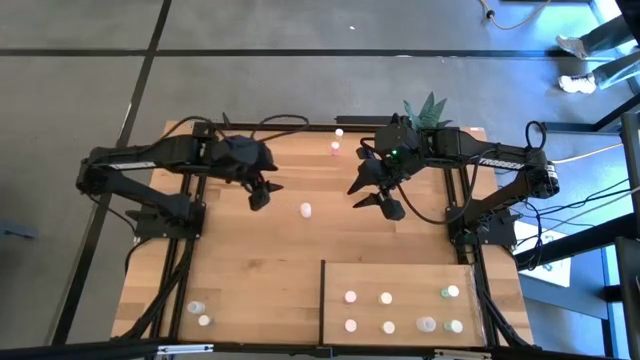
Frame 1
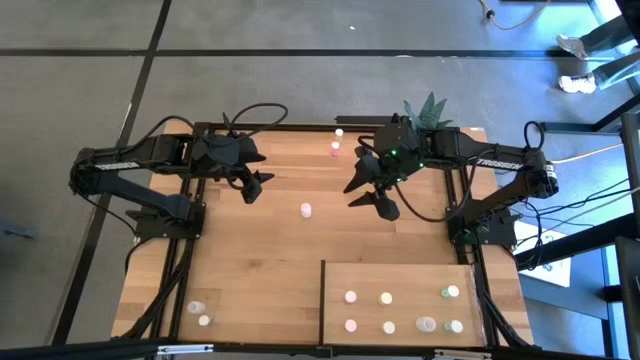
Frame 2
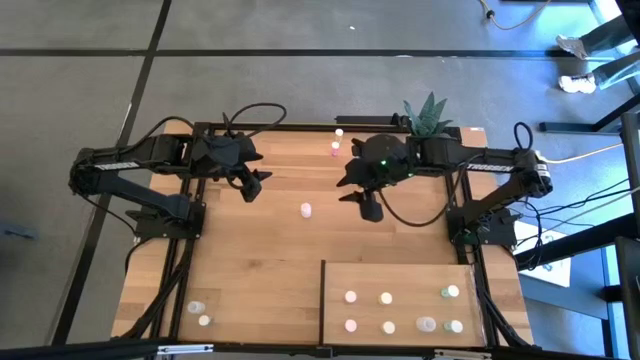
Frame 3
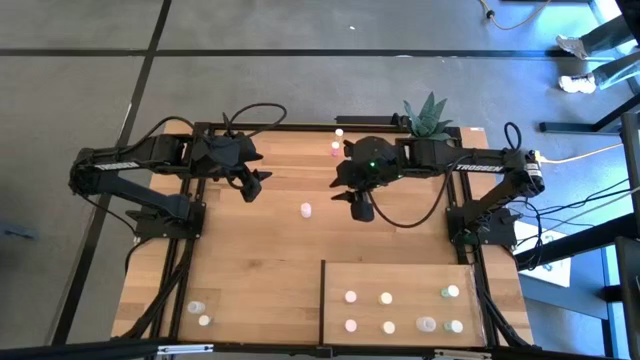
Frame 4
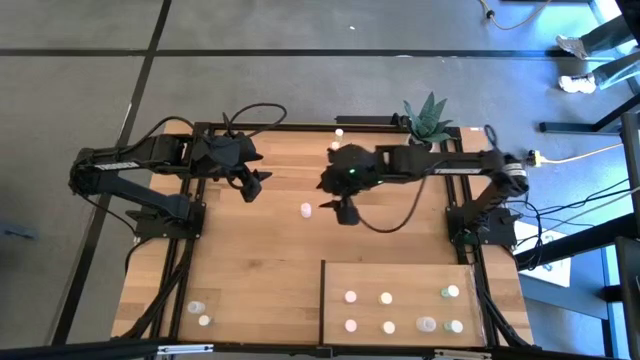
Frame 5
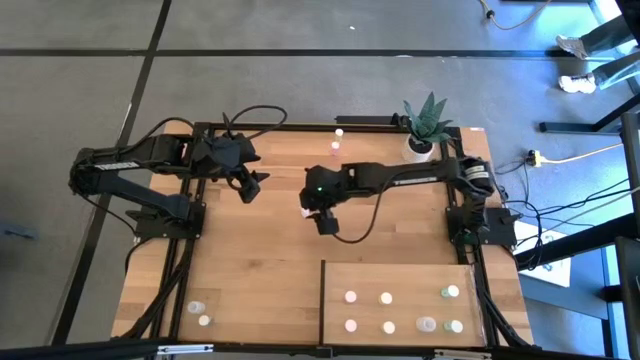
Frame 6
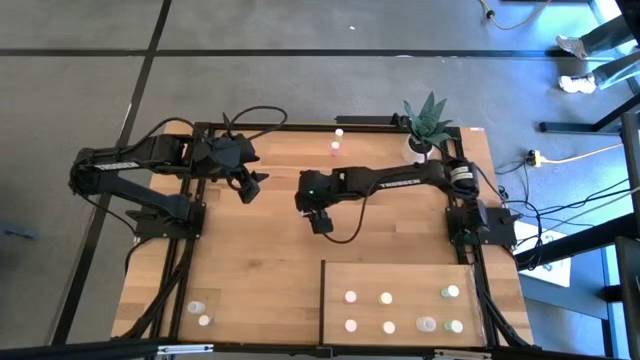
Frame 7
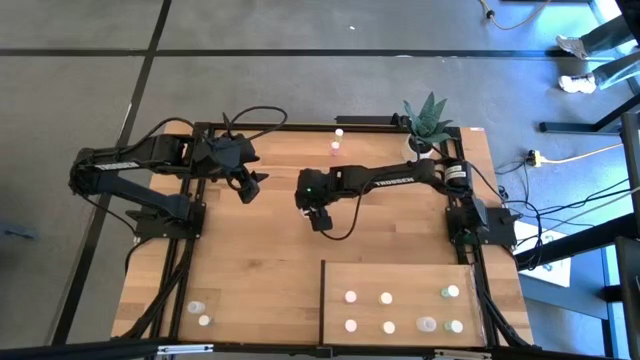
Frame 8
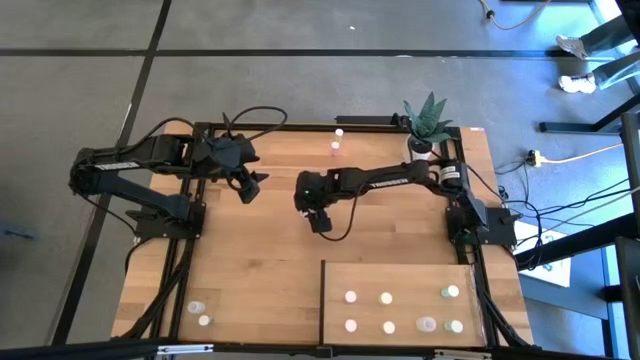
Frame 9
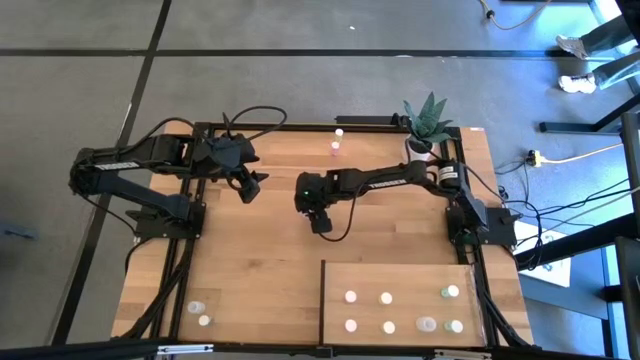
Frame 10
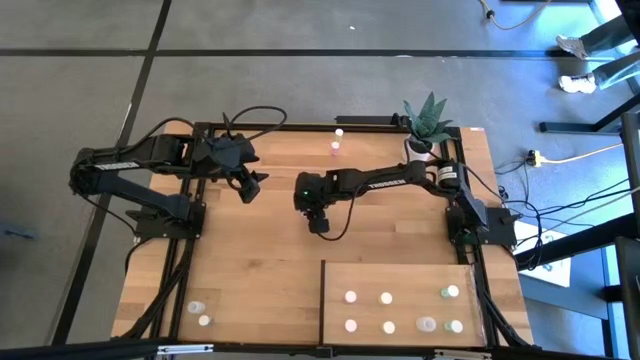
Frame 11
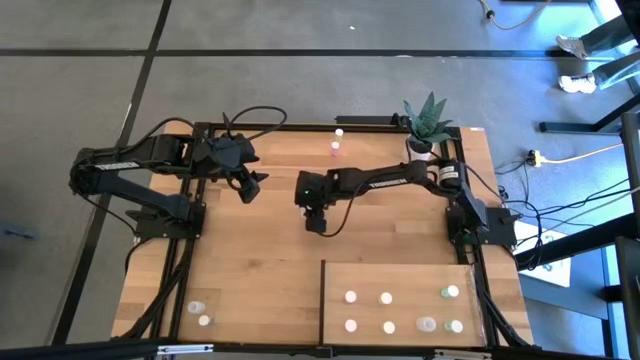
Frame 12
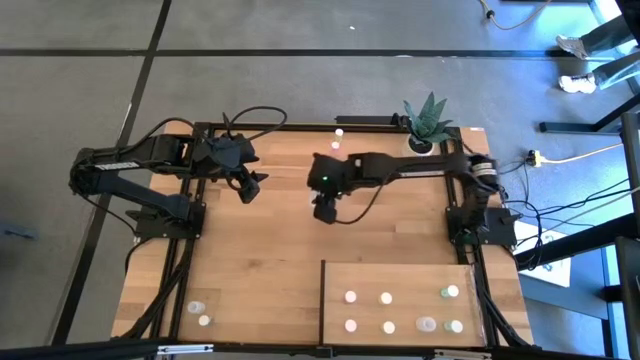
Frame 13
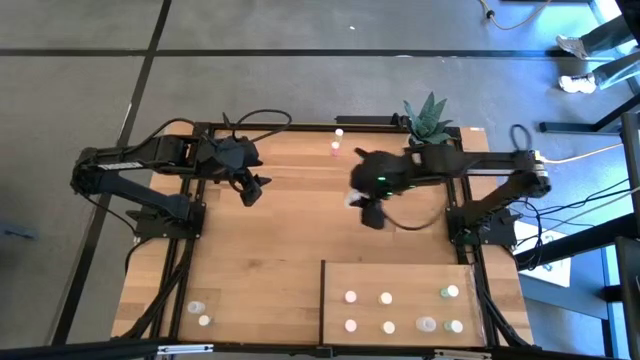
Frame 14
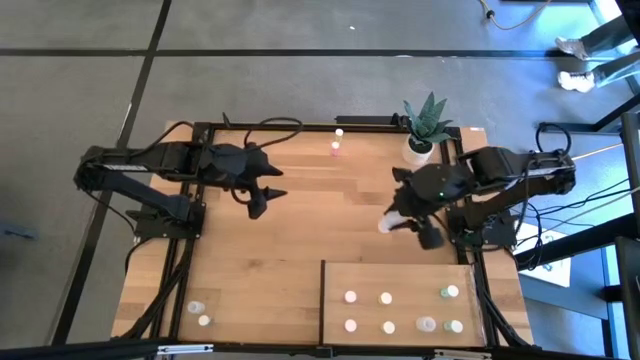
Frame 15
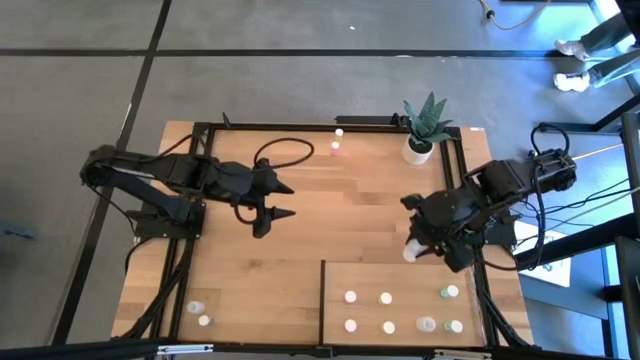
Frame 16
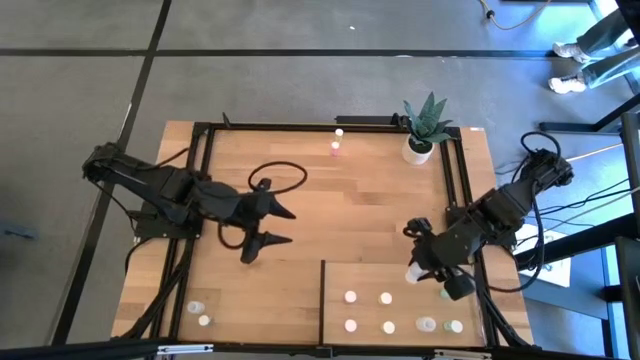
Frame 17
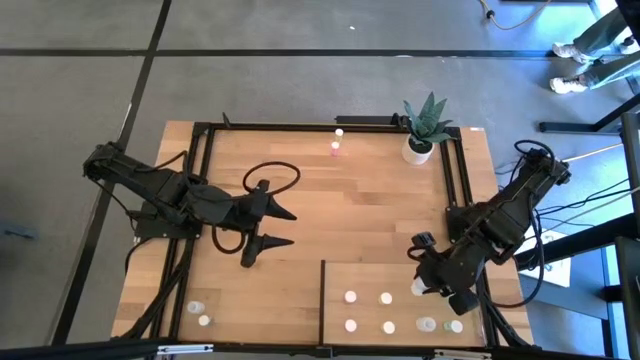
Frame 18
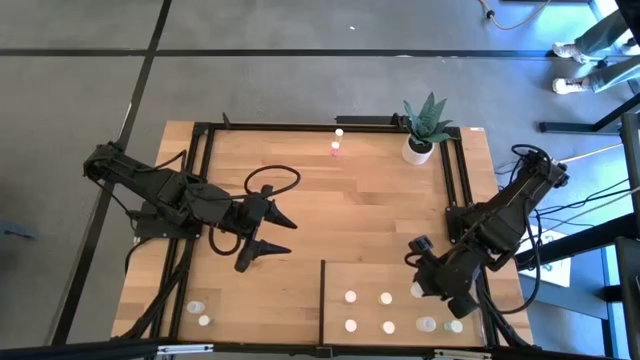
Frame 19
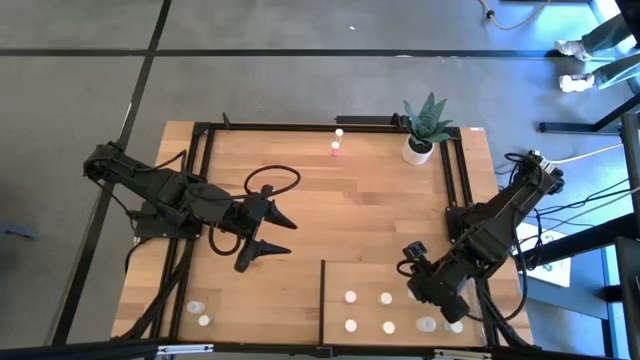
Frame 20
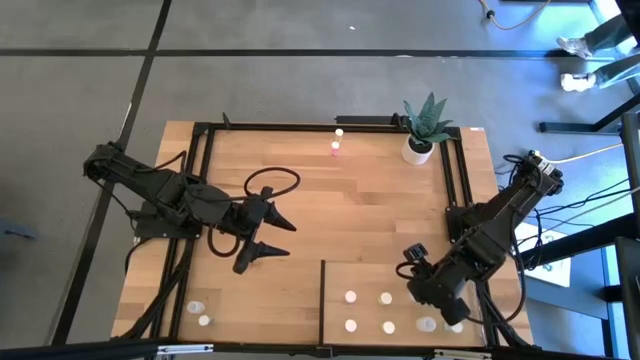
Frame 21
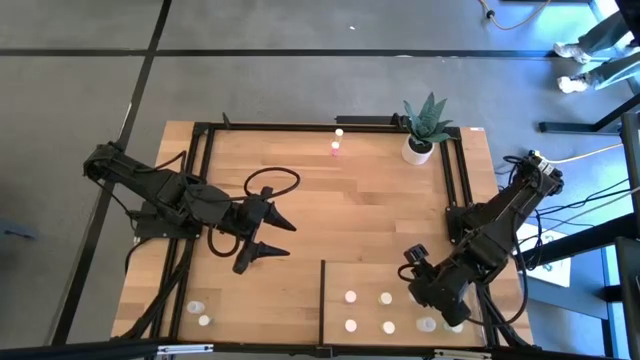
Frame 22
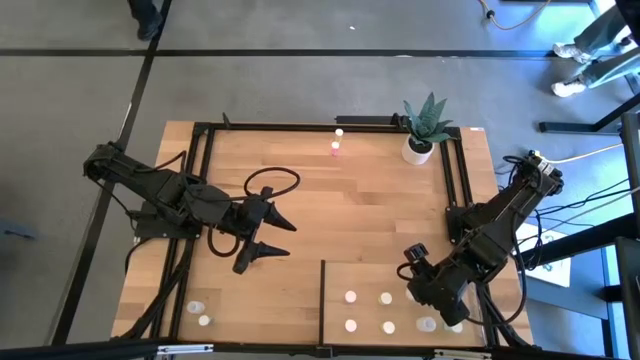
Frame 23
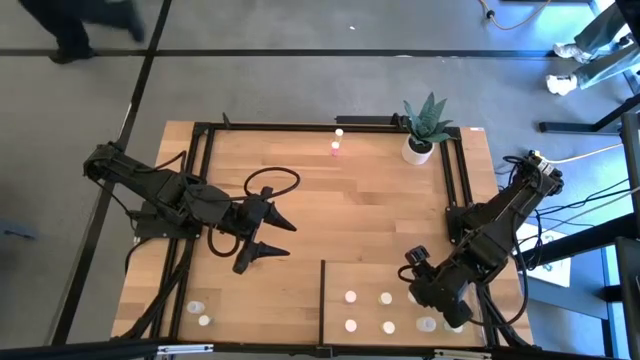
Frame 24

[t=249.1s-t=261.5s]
Task: Pick and place medicine bottles onto shelf by color
Put the top transparent pill bottle on the shelf aligned with the other transparent pill bottle

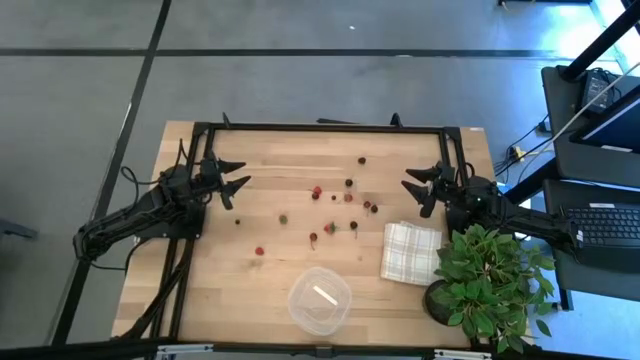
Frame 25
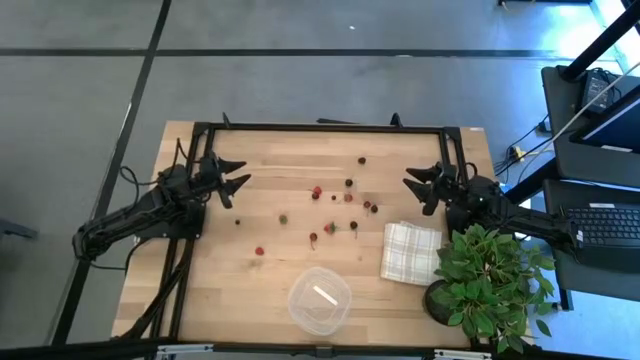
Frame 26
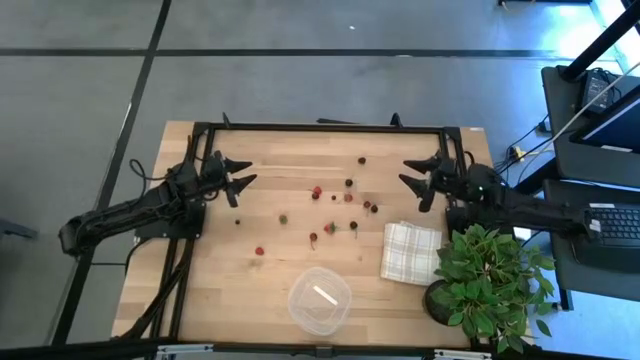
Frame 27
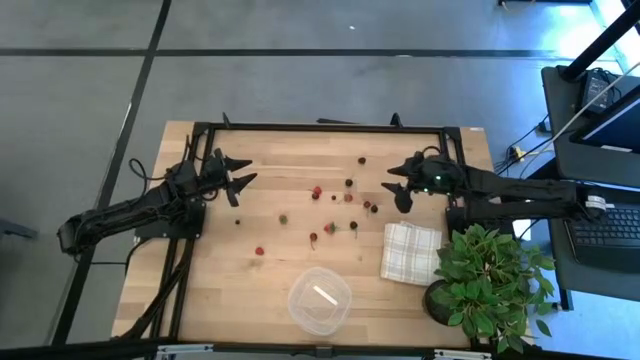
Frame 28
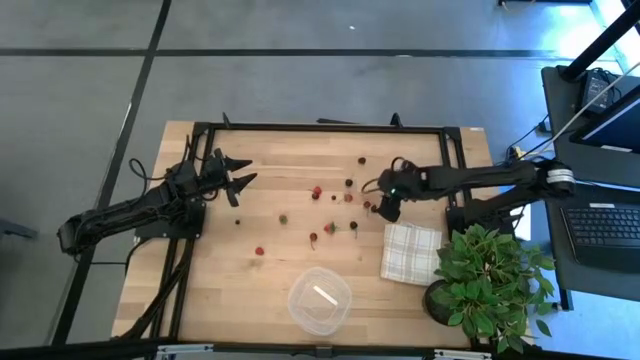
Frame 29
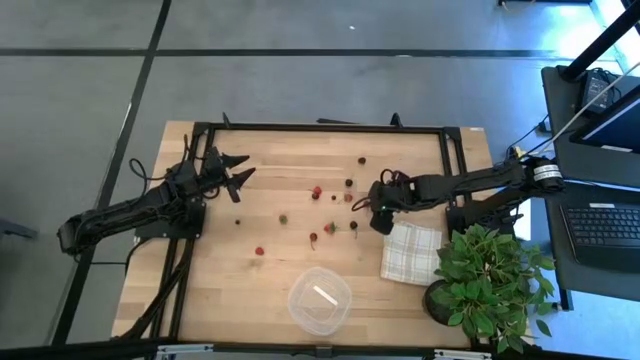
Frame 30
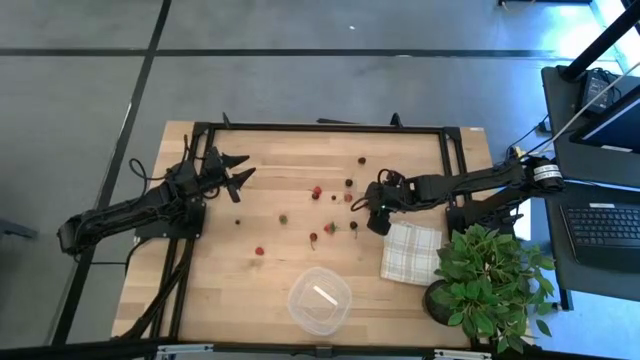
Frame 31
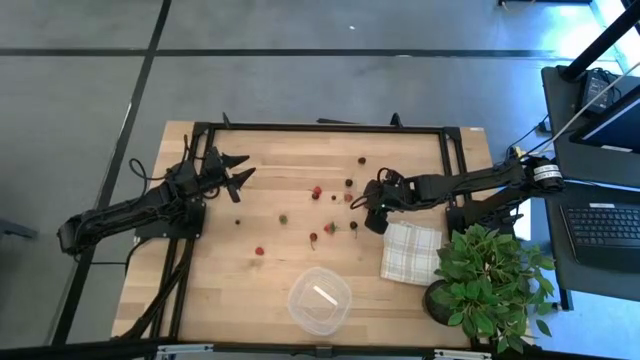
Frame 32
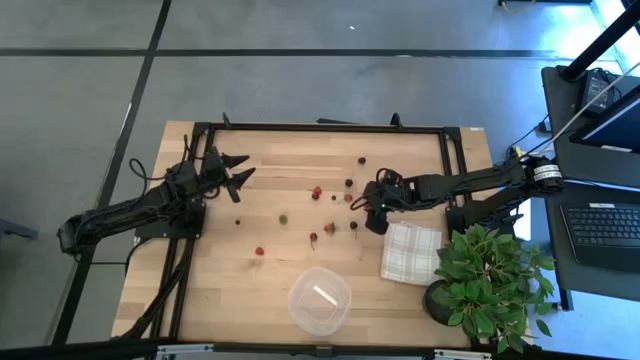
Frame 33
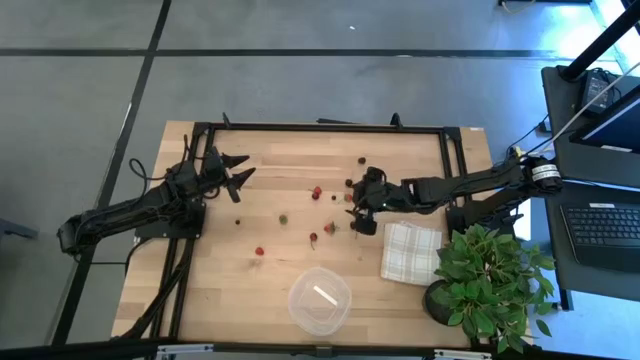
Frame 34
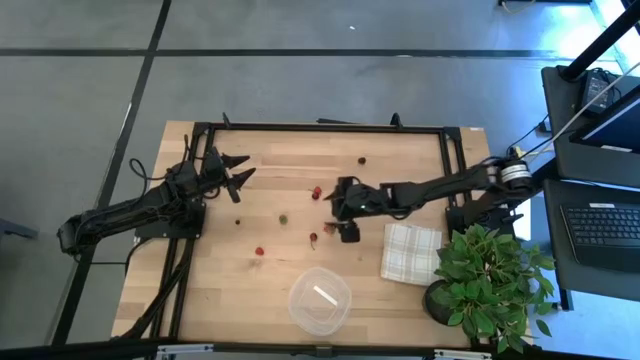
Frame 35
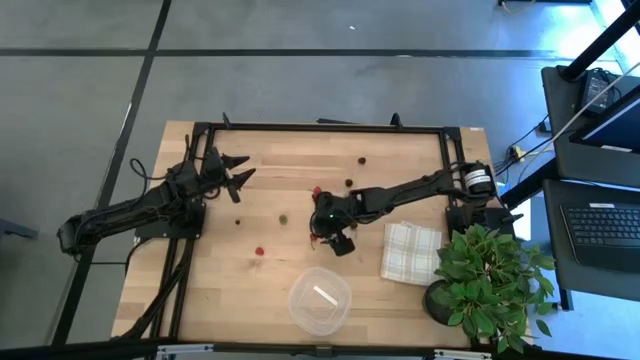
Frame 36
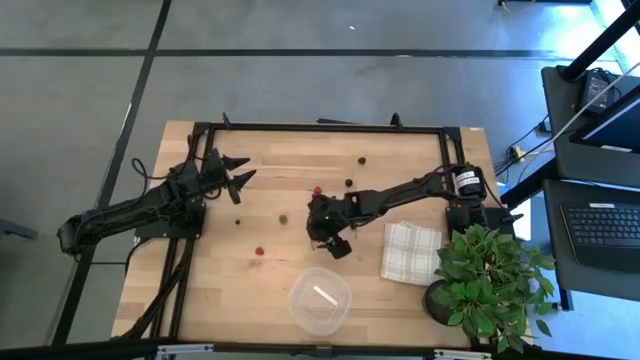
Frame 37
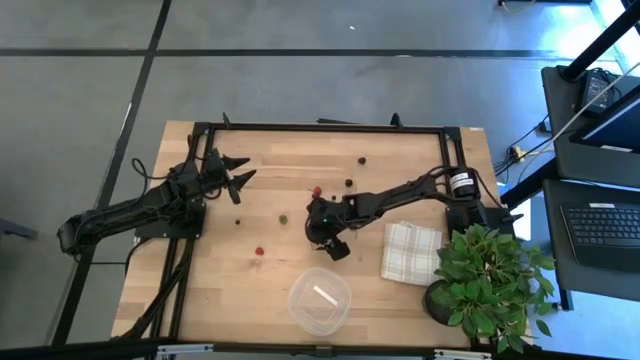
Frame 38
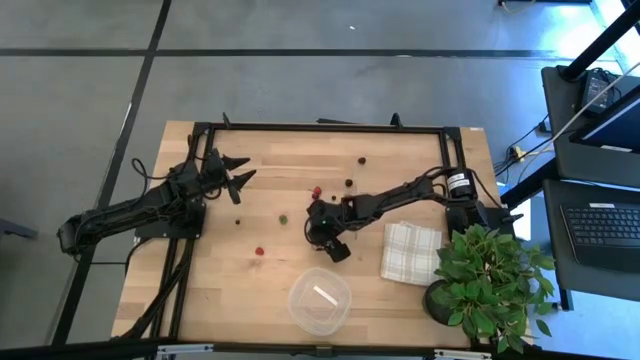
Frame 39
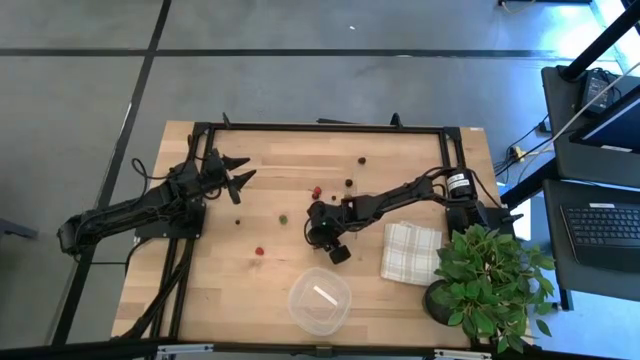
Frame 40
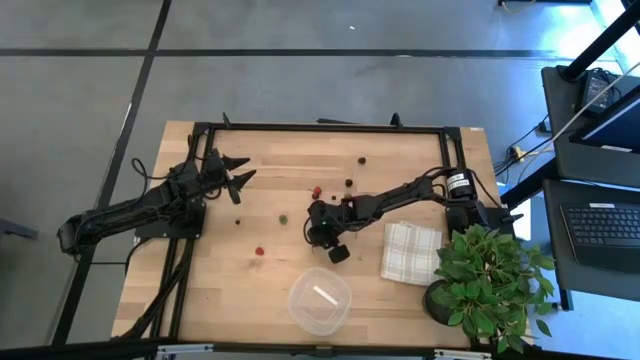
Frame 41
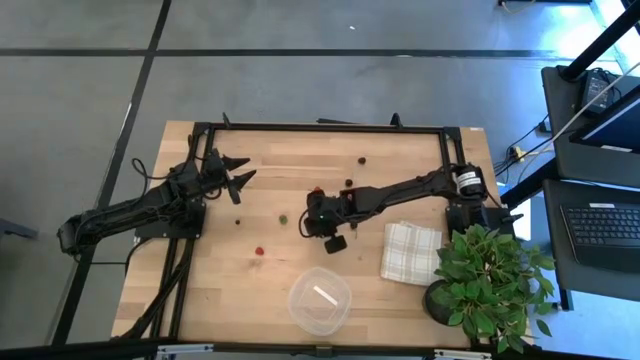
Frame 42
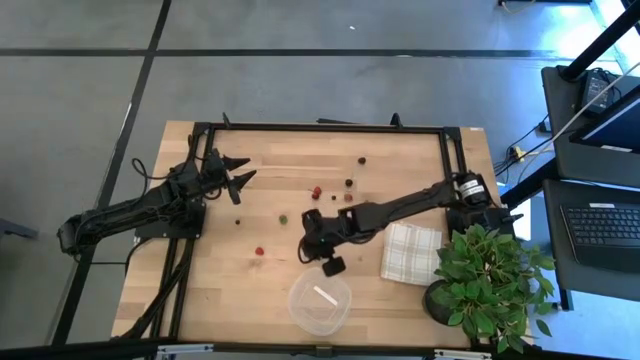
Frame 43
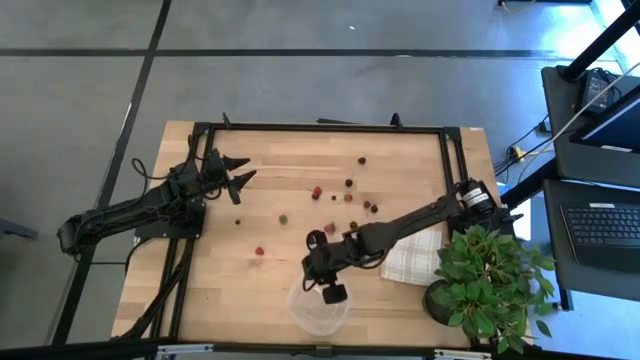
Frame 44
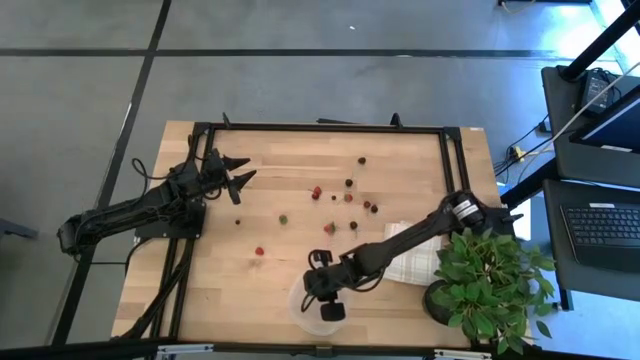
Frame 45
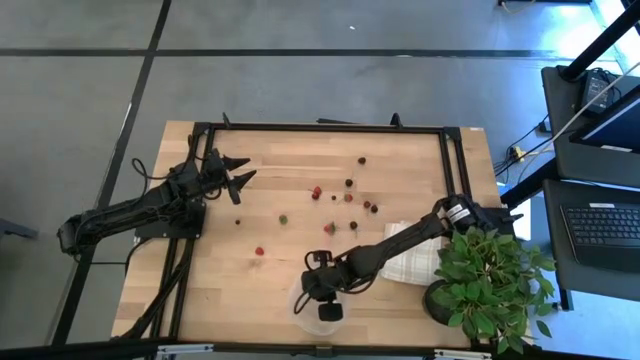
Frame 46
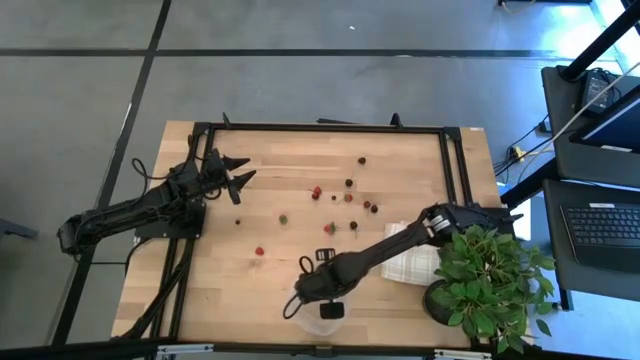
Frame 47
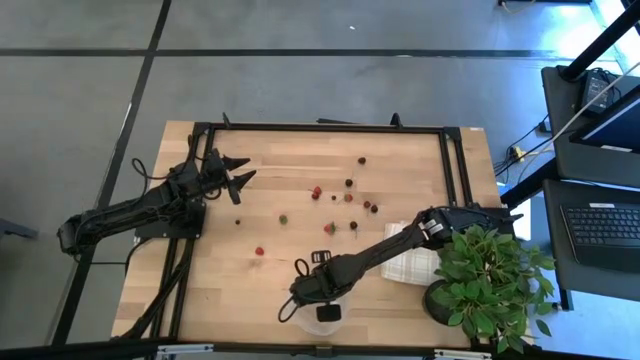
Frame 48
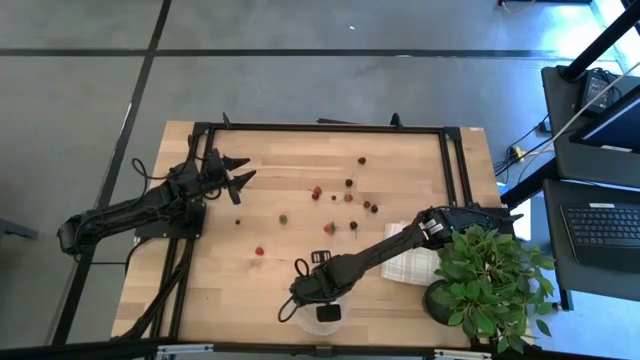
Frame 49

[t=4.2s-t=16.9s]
Task: Pick and placing Produce into tupperware
Put the dark red cherry in the bottom transparent bin
